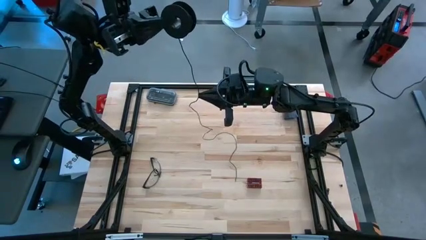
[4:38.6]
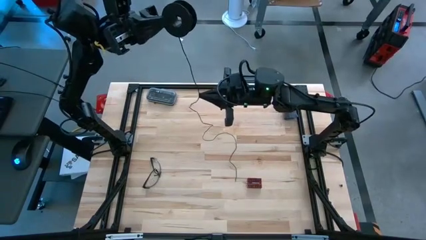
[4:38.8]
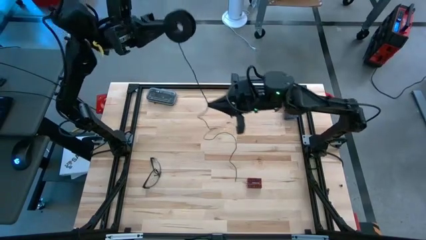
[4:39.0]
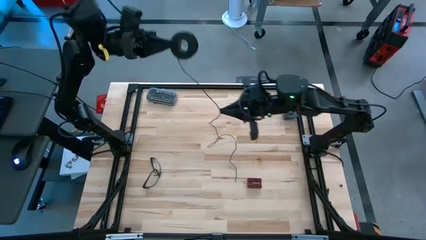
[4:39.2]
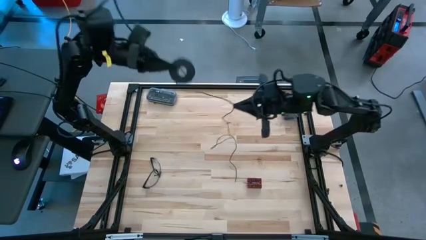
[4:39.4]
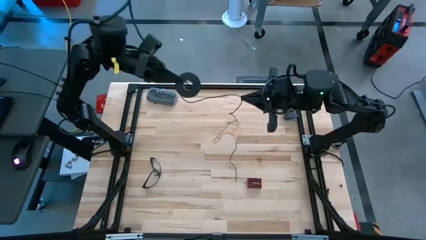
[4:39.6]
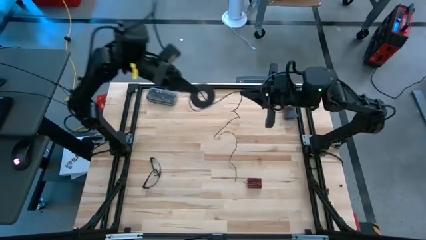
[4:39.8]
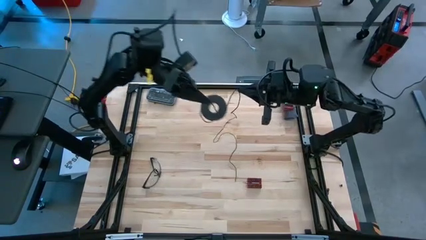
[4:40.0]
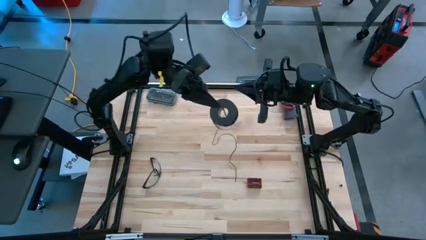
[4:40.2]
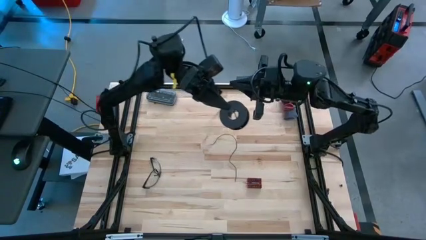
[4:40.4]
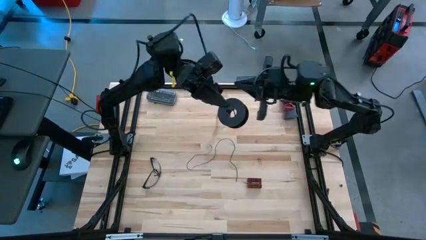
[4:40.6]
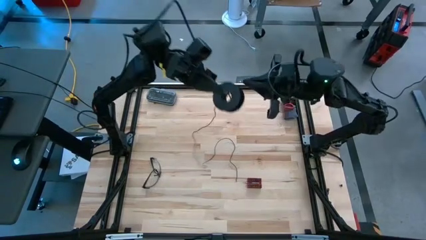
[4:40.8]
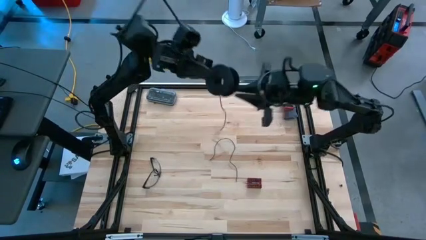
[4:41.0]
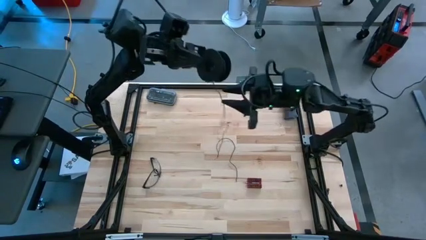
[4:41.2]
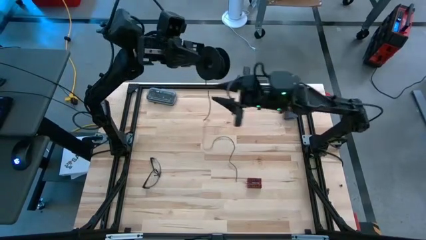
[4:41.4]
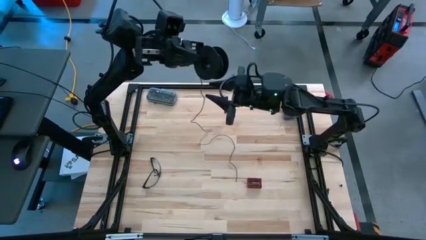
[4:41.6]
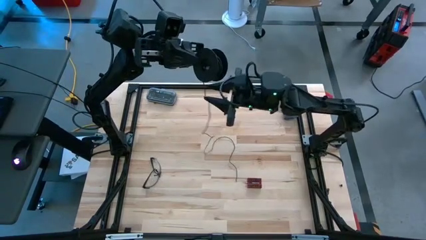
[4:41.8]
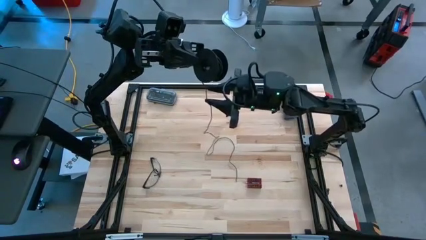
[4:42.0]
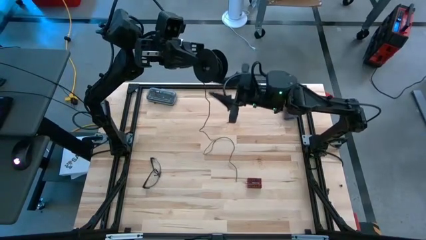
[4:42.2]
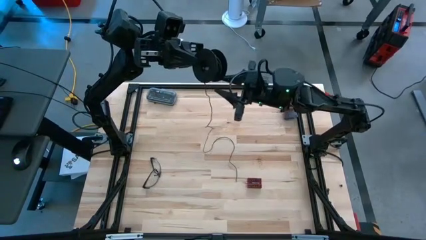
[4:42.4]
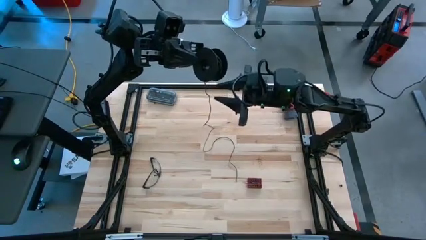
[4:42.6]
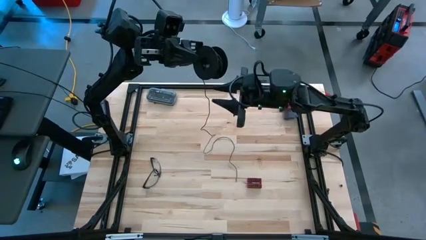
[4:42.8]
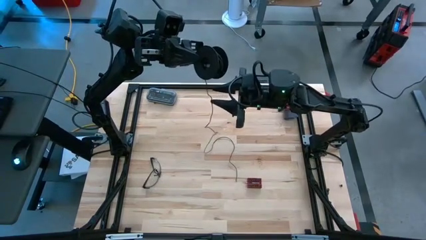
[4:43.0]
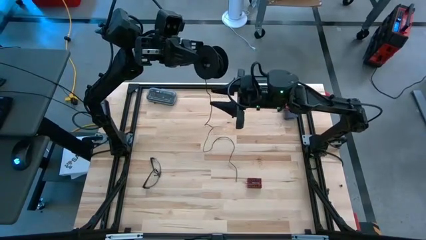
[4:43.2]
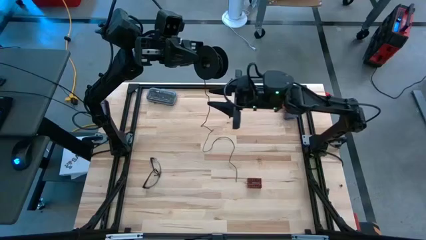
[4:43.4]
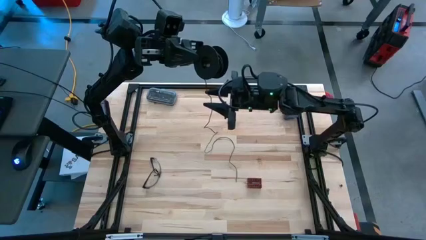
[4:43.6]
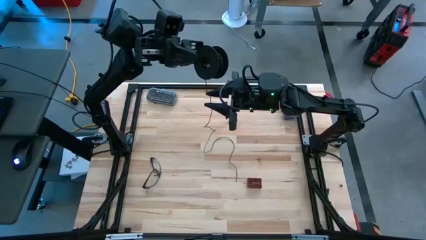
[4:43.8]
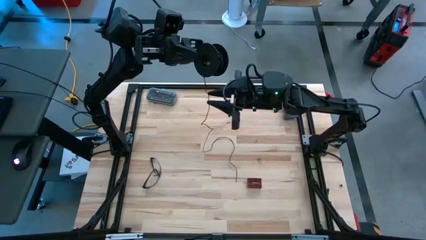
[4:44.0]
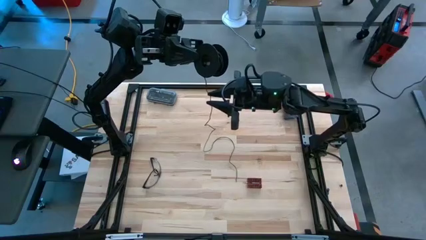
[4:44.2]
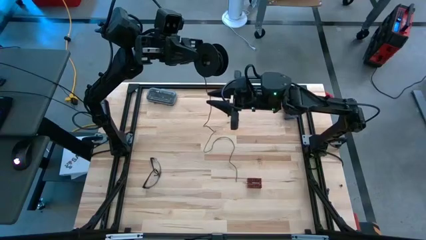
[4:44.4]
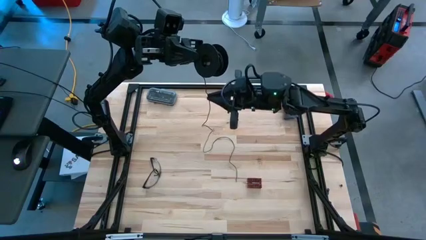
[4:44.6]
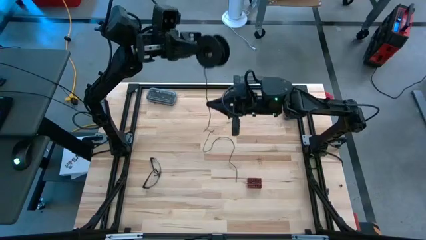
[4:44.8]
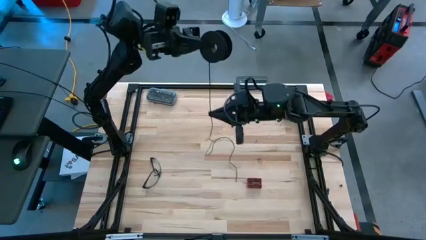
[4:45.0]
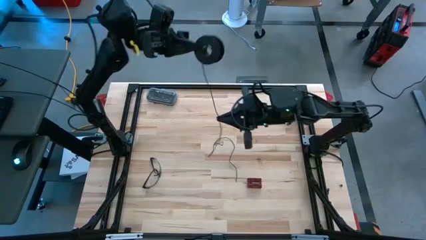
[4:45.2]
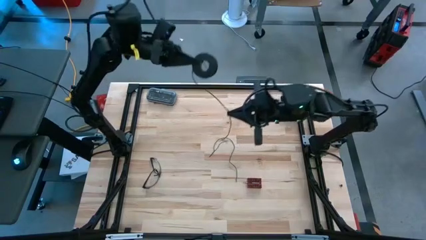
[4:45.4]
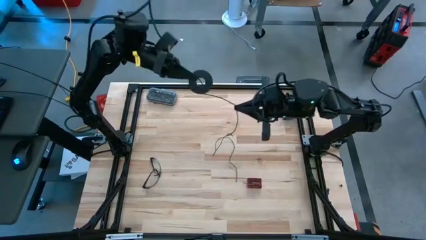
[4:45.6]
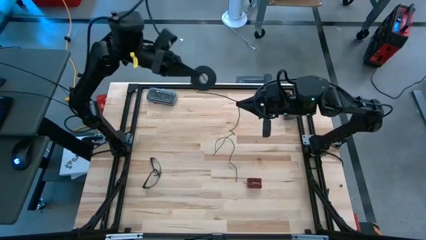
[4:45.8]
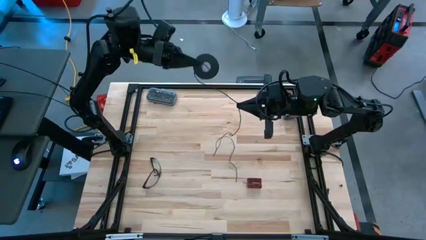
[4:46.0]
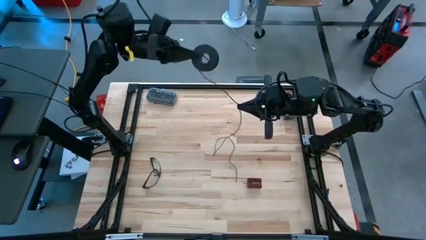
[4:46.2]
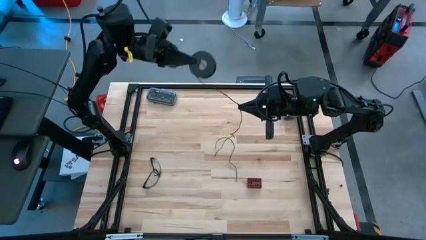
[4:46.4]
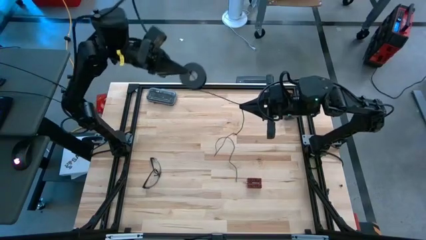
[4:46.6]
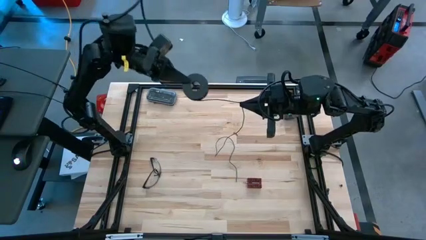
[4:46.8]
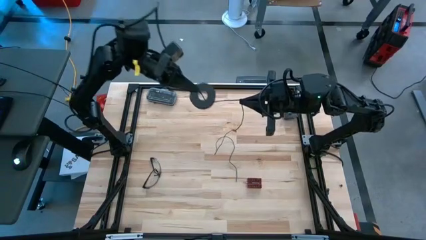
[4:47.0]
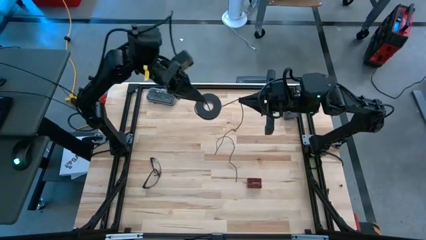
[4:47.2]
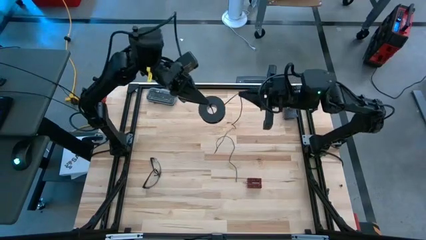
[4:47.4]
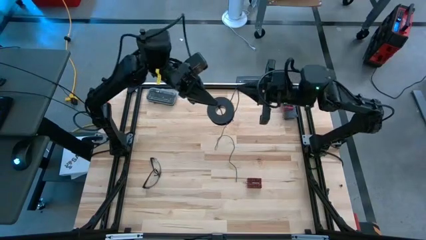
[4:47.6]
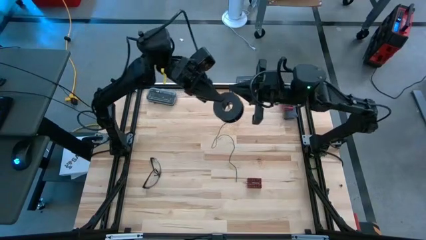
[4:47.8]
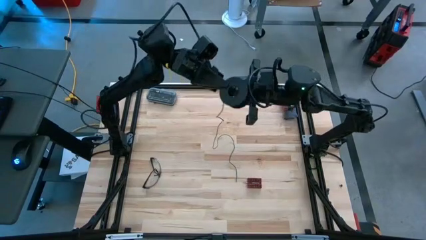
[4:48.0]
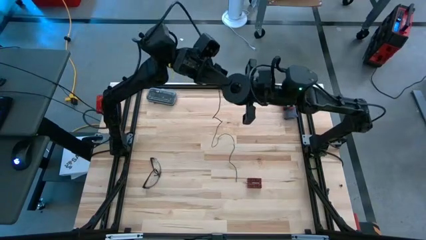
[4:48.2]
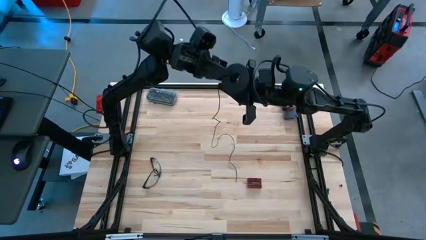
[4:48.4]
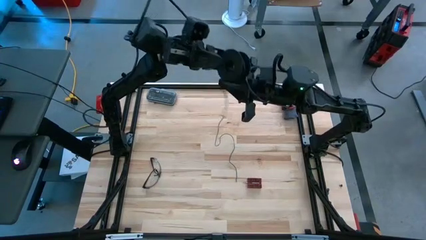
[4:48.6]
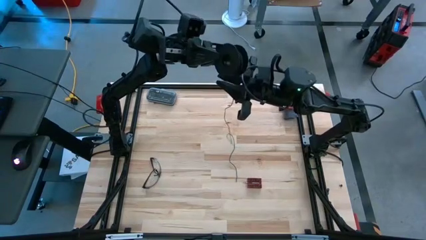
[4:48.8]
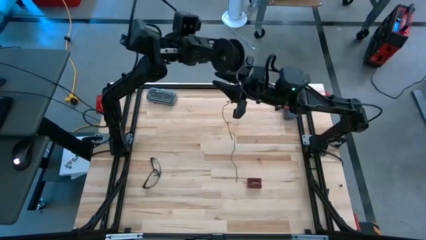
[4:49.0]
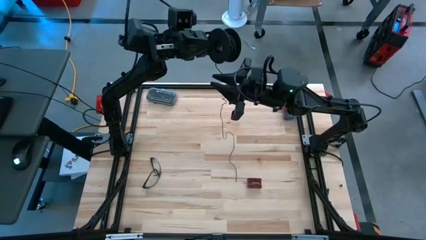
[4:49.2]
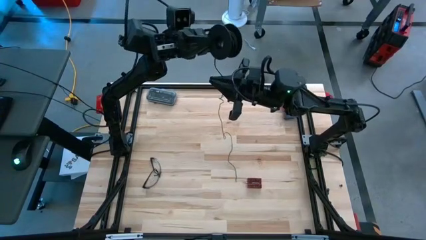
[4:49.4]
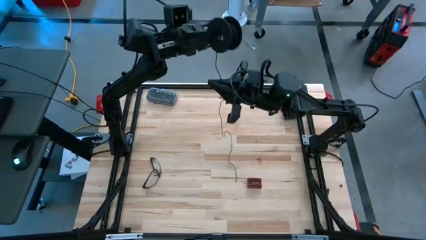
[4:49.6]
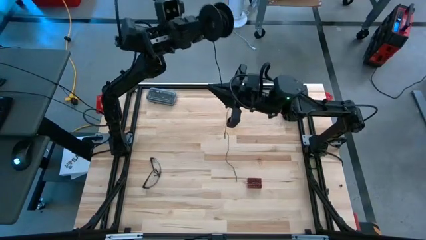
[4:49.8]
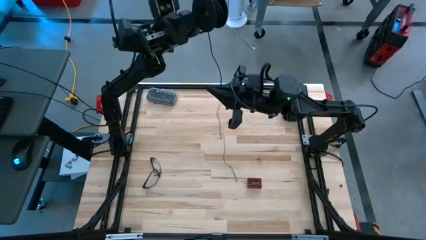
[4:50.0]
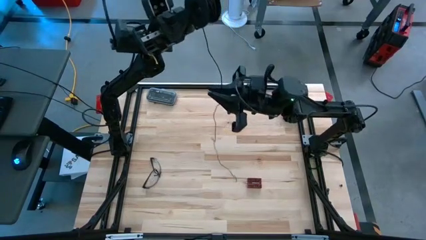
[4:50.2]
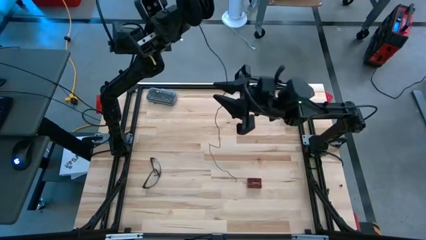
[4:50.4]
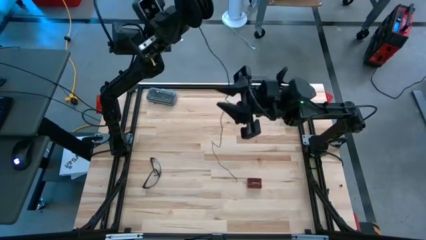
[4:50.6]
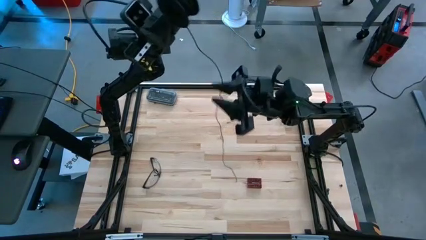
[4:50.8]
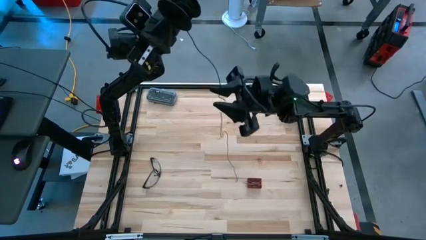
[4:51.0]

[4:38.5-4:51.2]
Task: Coil cords
Coil the black wire into the spool

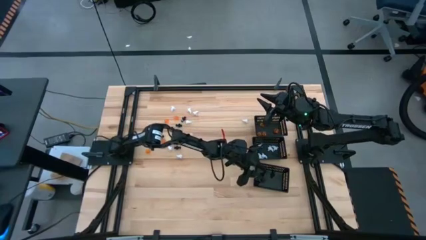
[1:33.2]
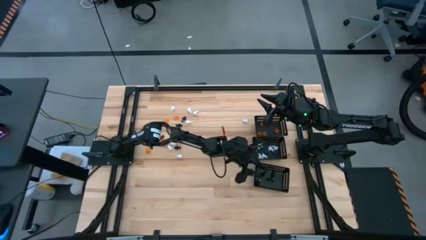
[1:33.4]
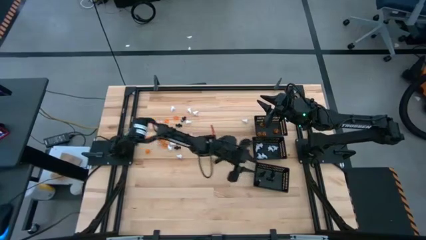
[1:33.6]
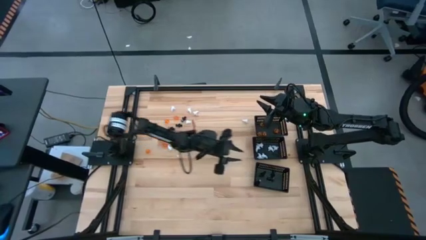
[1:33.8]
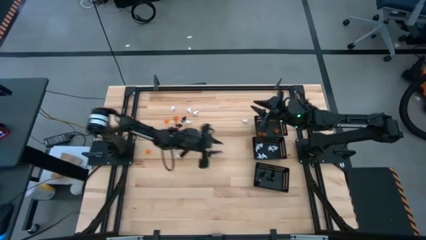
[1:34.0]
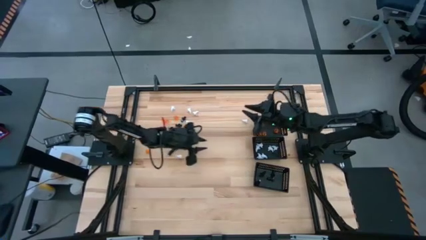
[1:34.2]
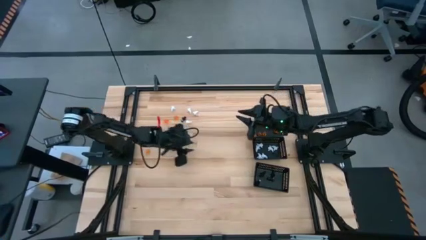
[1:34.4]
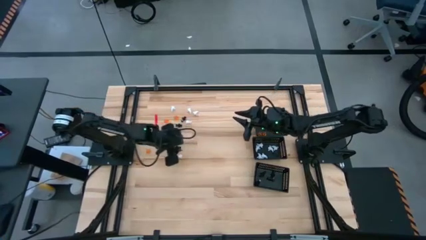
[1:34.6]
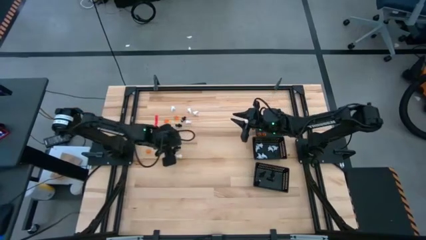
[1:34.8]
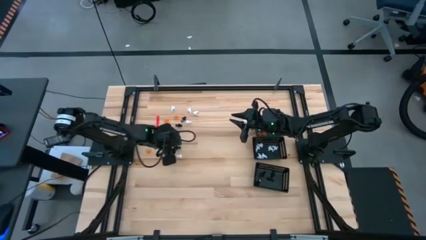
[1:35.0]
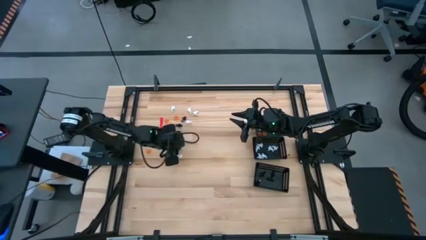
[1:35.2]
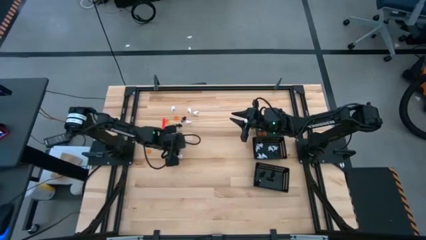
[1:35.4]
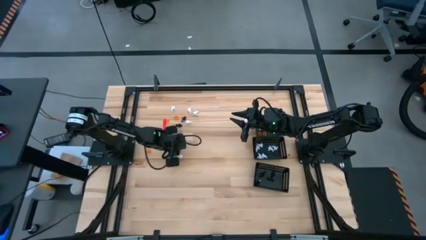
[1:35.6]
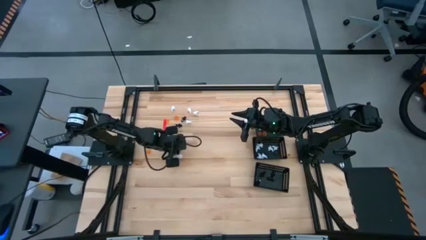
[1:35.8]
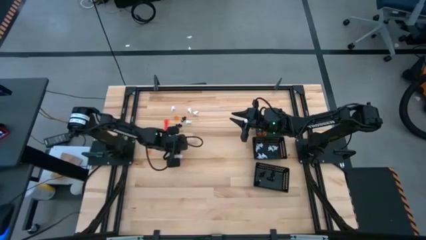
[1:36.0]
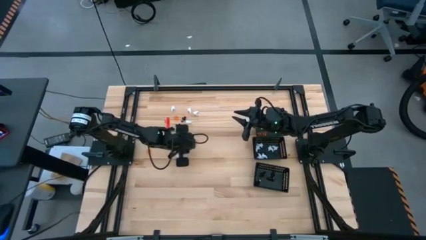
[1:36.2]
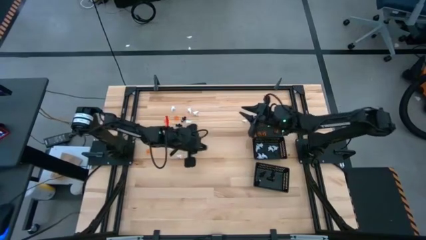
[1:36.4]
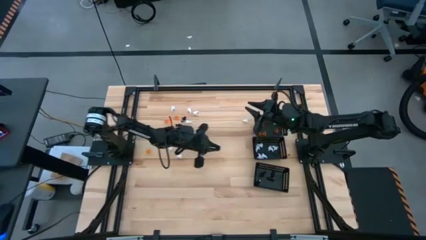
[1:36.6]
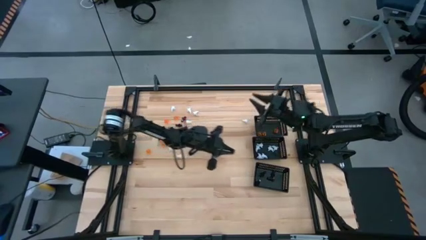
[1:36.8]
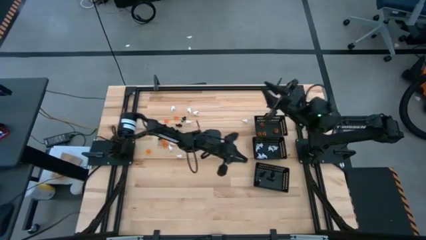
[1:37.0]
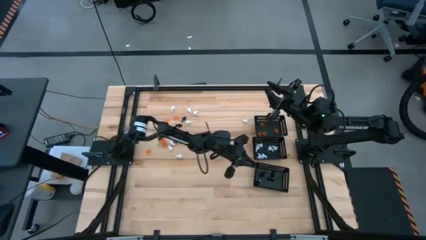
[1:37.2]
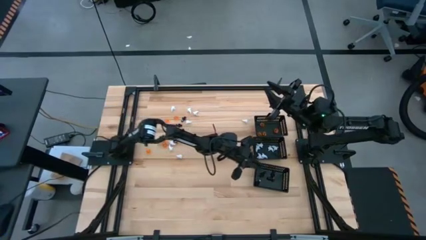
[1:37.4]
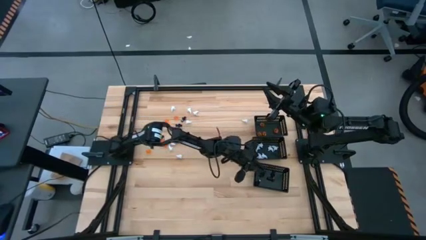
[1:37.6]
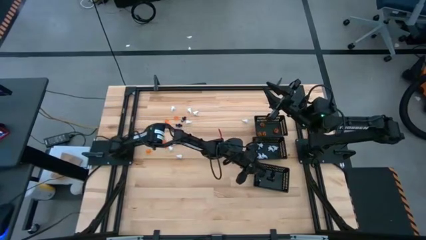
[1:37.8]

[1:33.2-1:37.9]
Task: Sort Halloween decoration
Put the black skeleton toy into the bottom black bin
